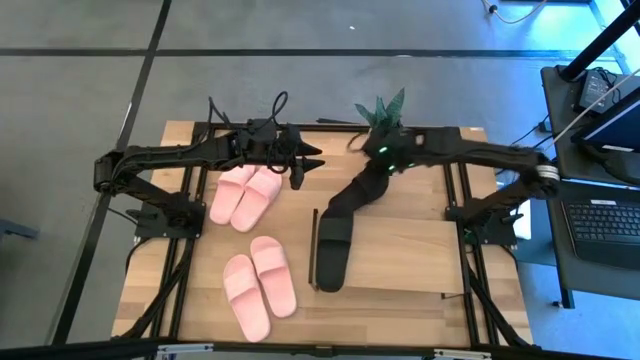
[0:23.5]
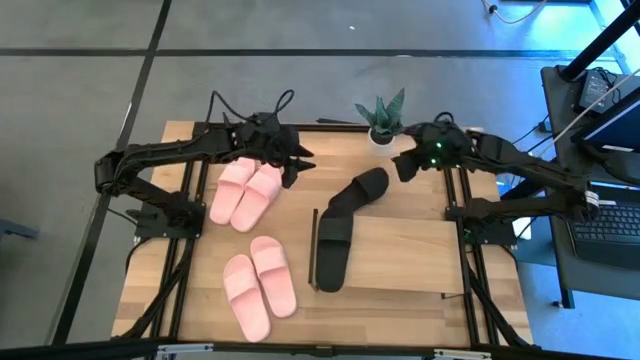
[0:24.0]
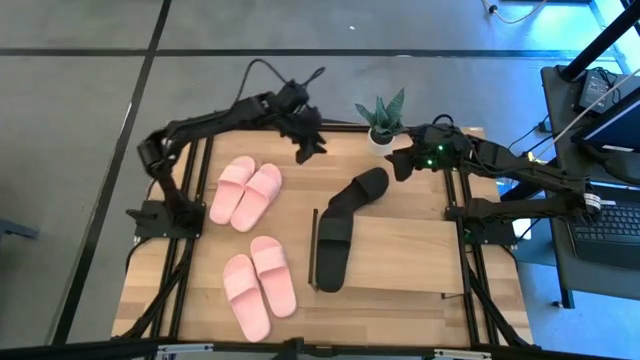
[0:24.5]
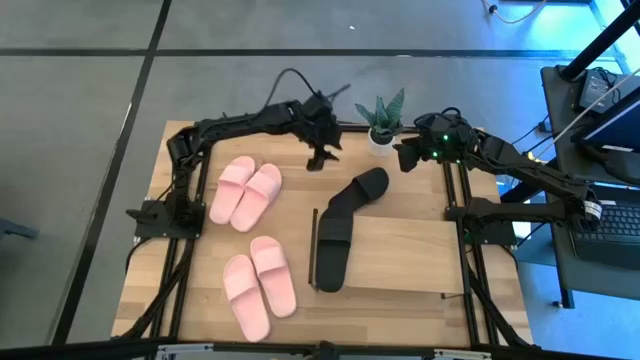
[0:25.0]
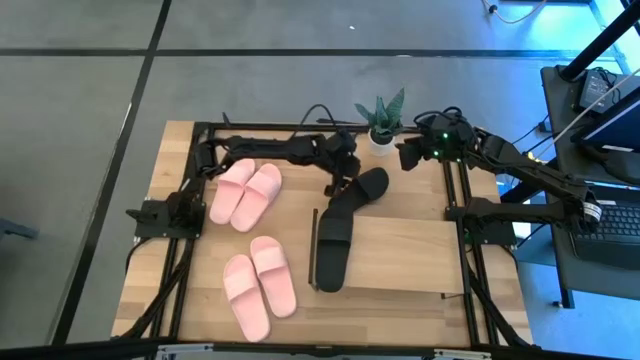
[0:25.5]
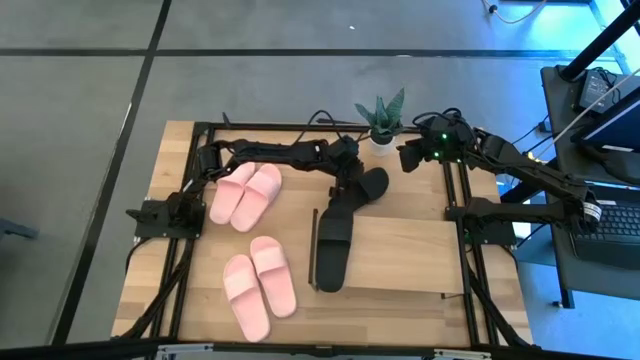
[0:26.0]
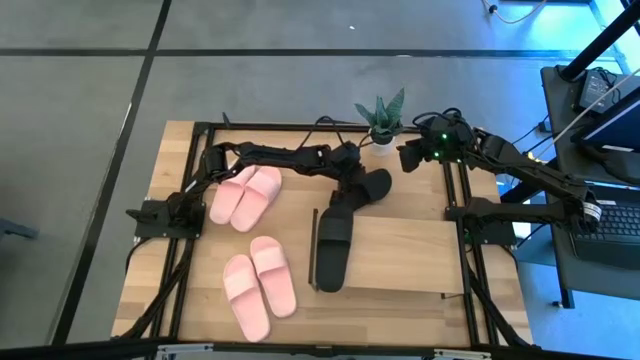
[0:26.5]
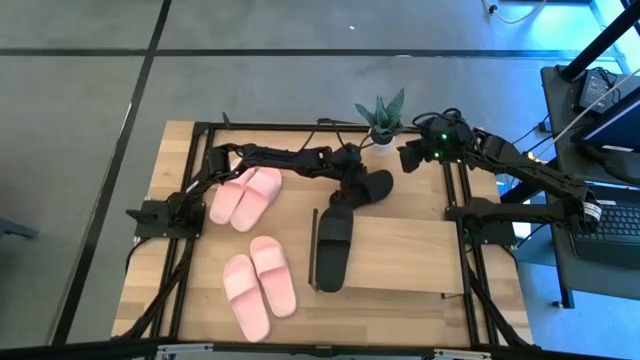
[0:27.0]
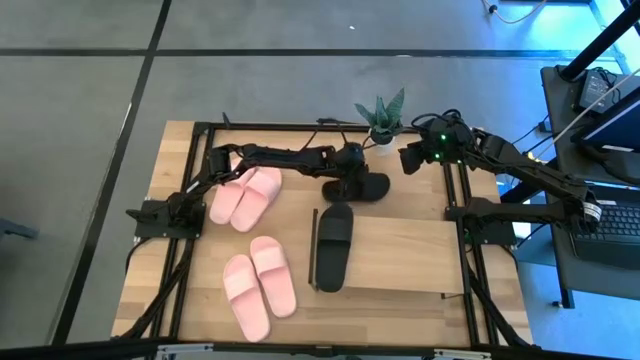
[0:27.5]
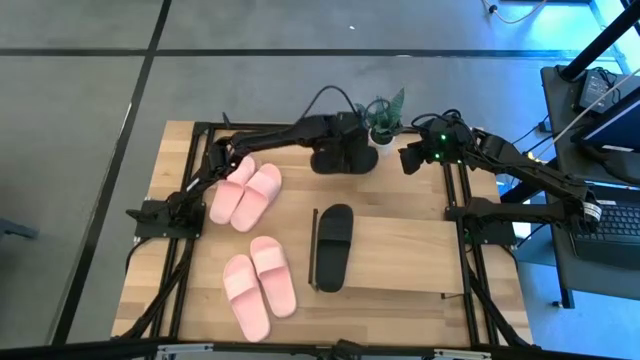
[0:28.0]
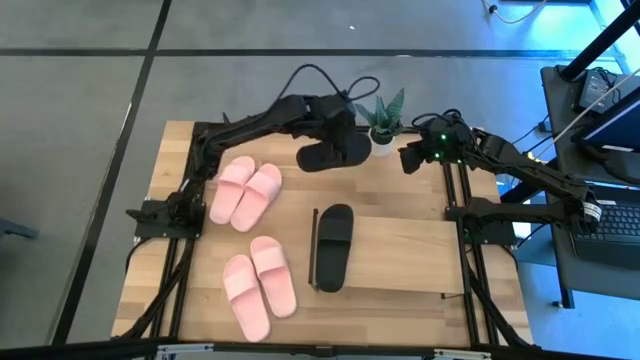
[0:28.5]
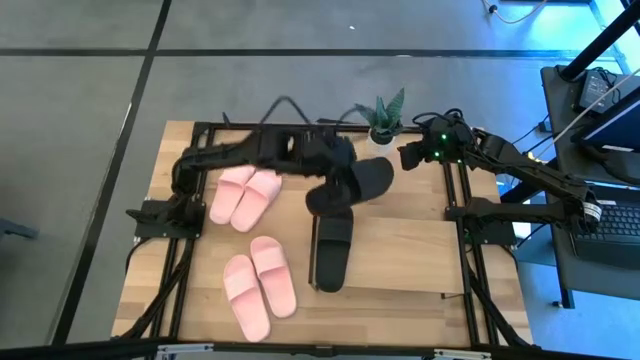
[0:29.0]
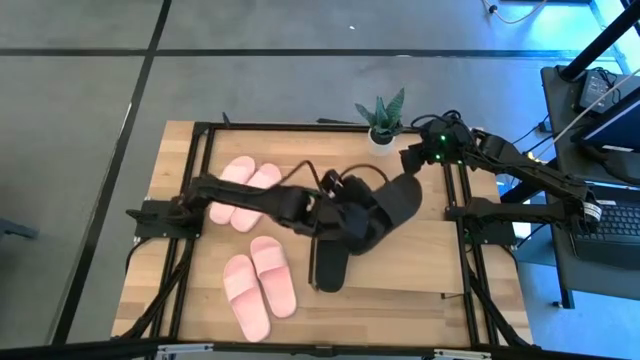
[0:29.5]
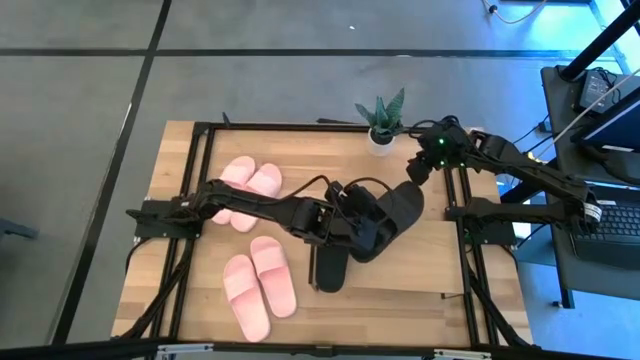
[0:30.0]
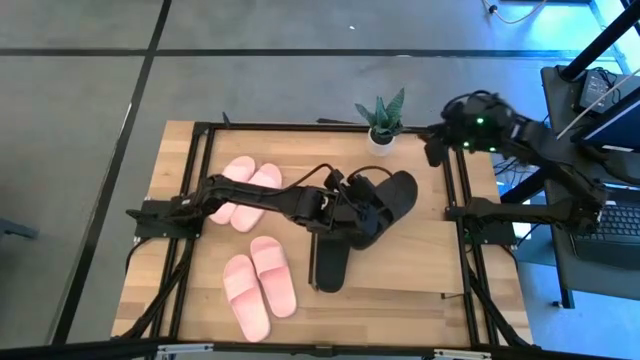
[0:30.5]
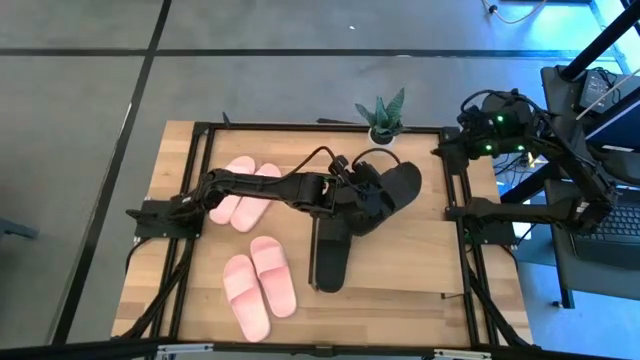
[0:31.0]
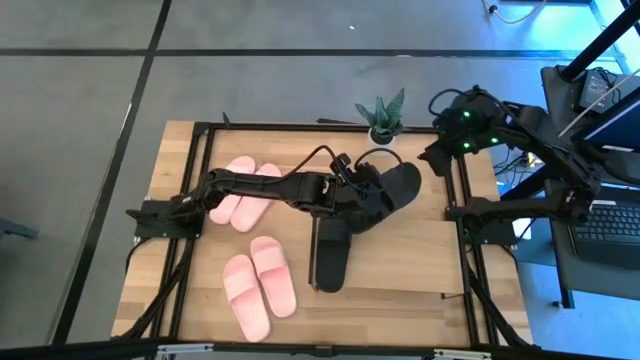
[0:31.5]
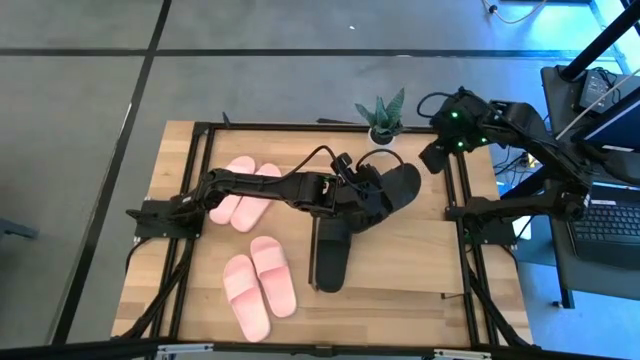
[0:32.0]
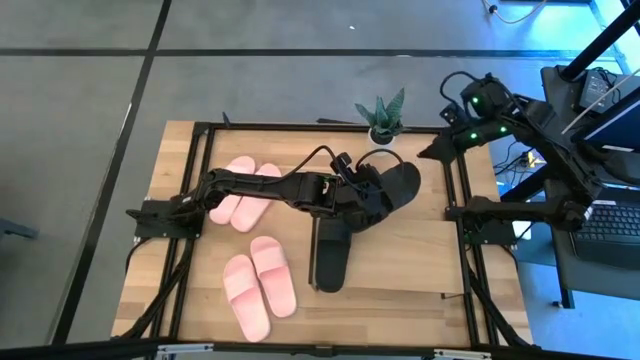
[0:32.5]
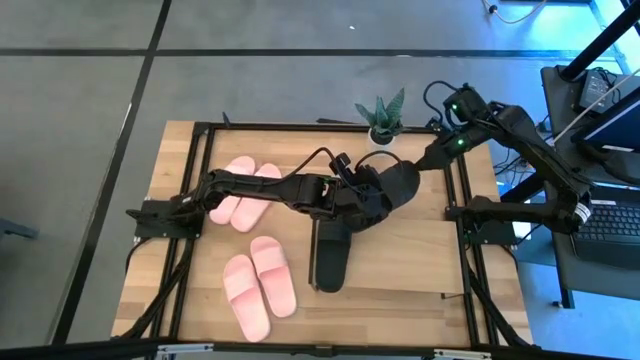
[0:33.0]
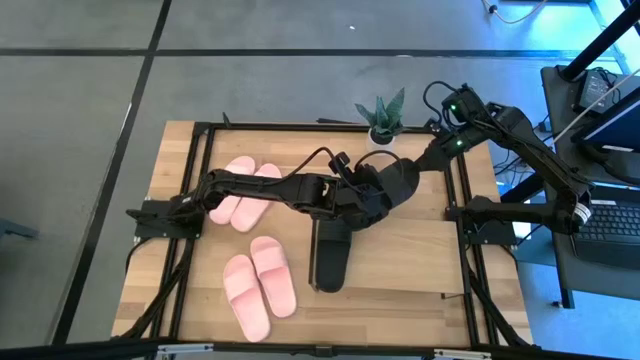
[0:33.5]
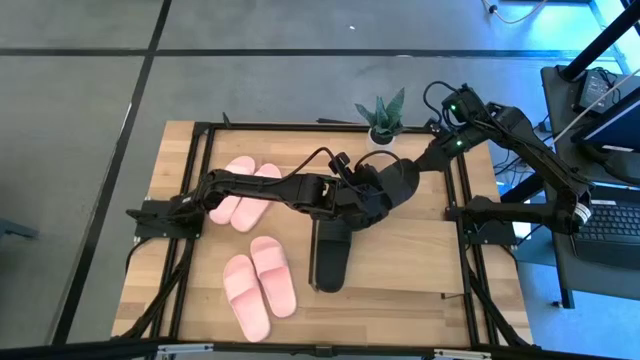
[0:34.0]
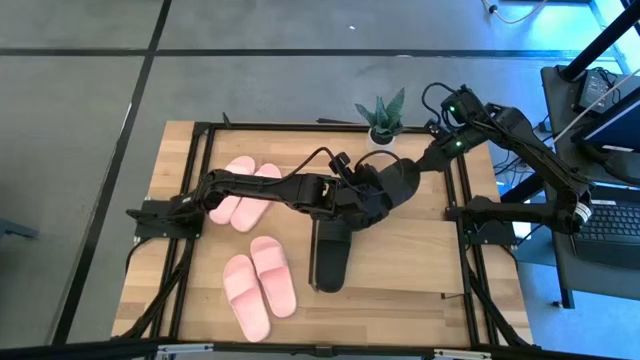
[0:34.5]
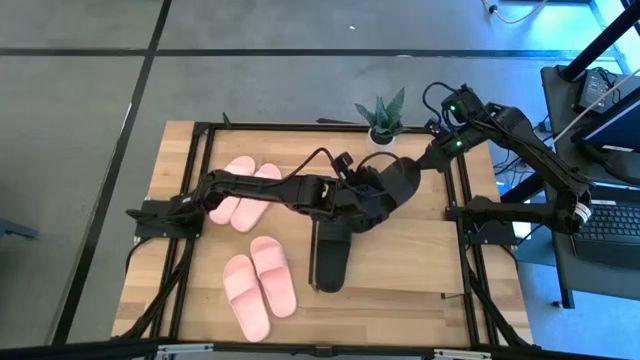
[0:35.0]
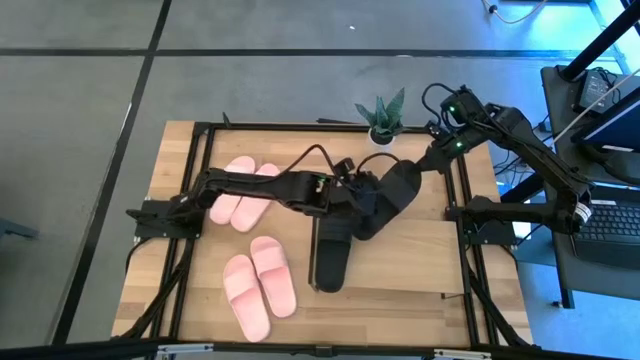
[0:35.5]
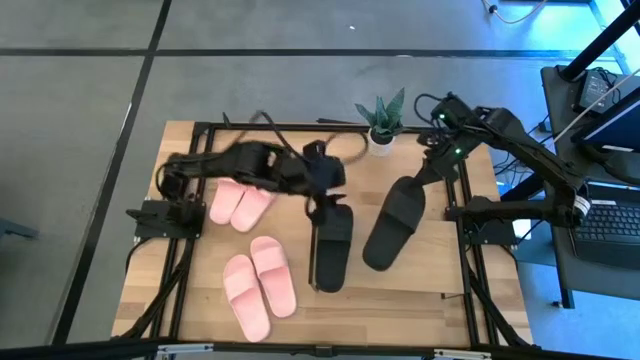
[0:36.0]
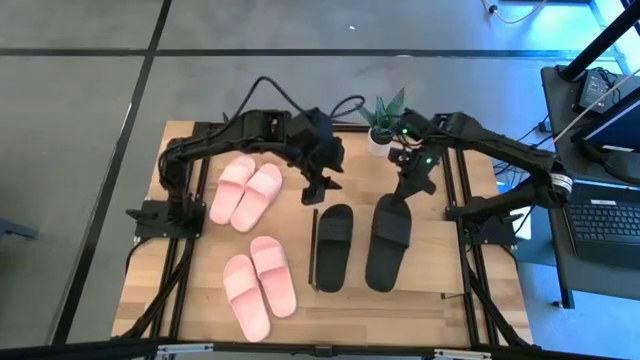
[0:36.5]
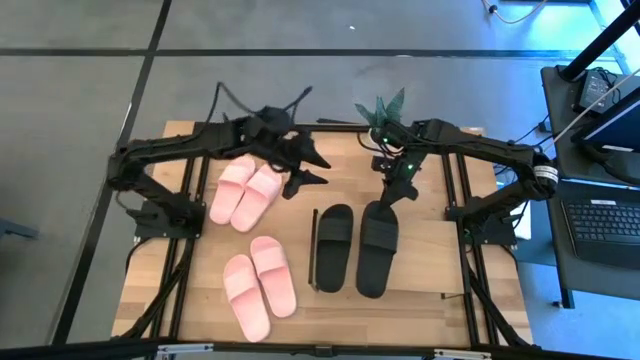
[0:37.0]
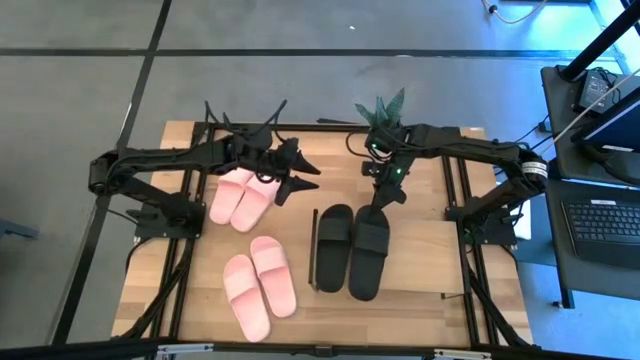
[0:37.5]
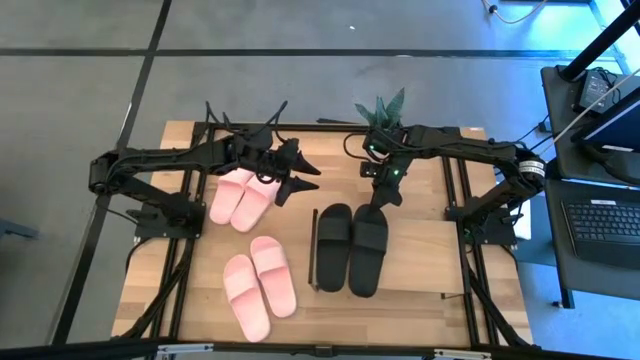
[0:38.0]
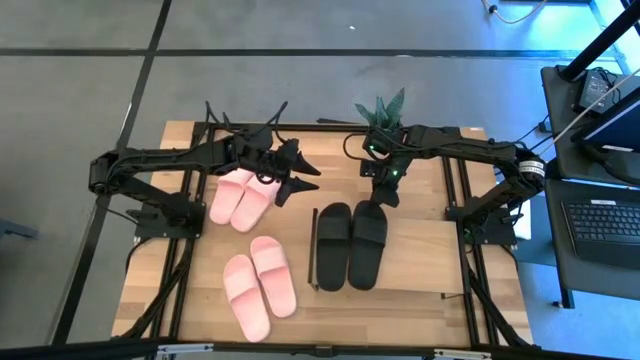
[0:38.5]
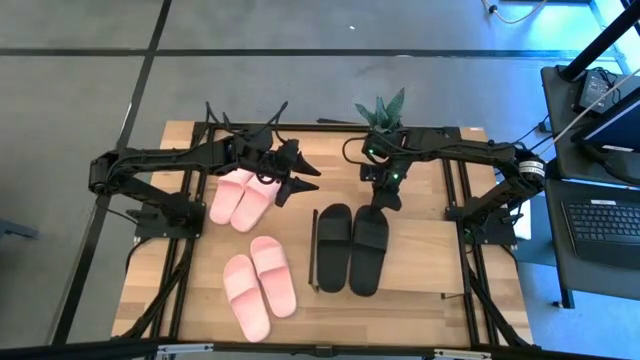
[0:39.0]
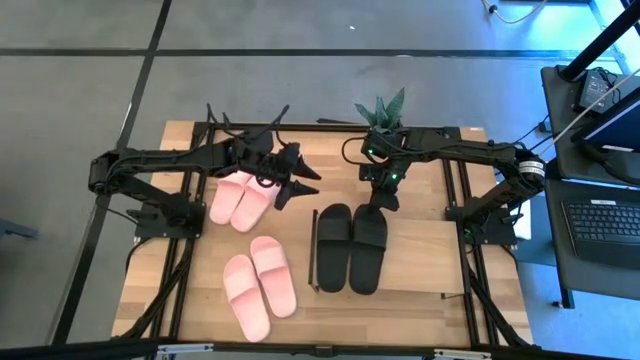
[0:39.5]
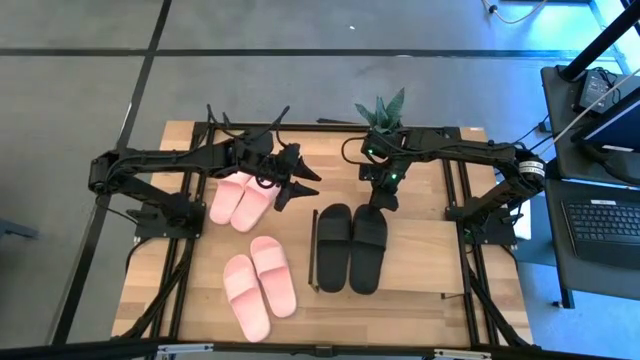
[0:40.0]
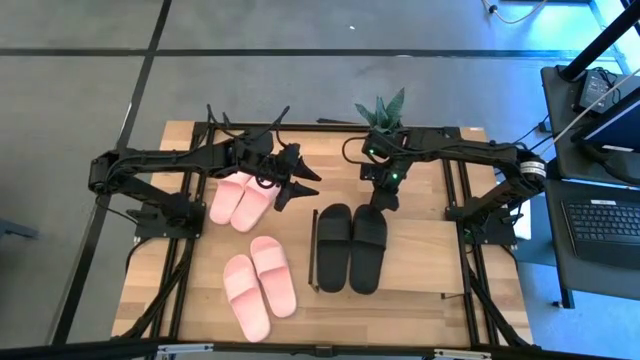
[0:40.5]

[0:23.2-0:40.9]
Task: Pick and place slides into the shelf
Put the black slipper onto the shelf

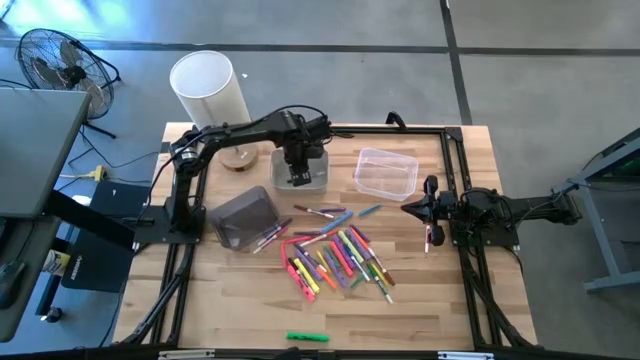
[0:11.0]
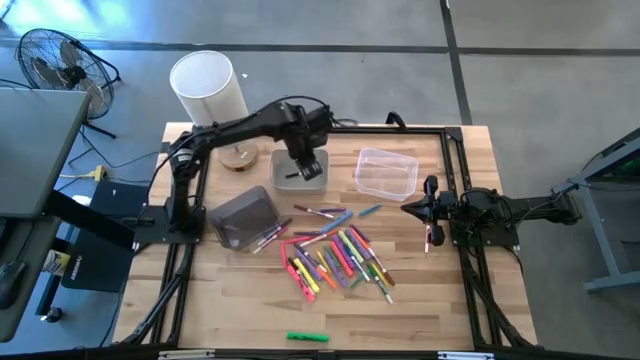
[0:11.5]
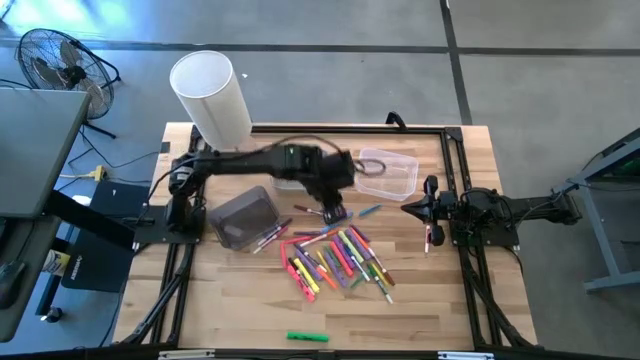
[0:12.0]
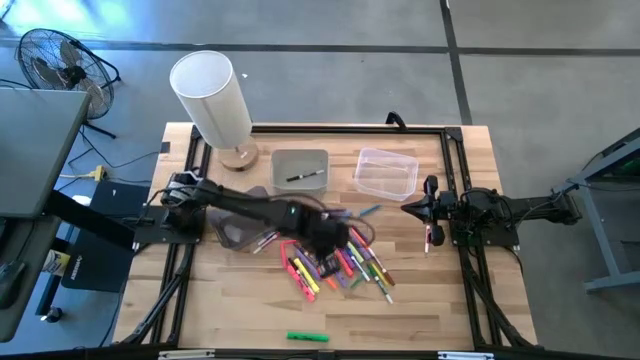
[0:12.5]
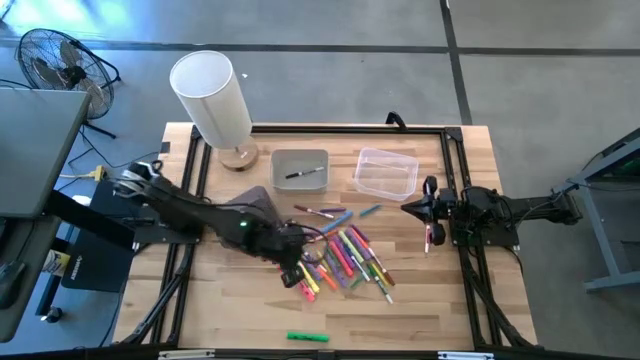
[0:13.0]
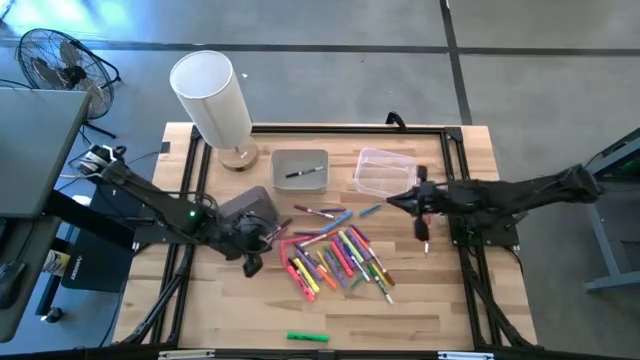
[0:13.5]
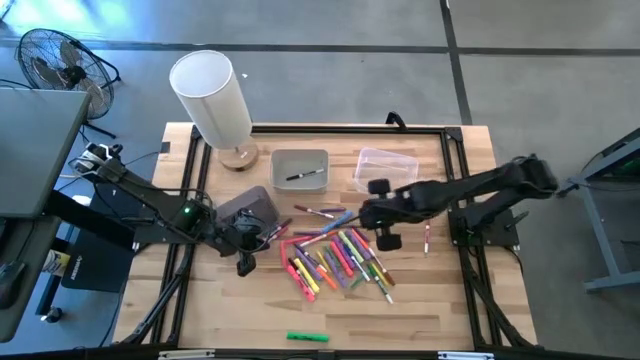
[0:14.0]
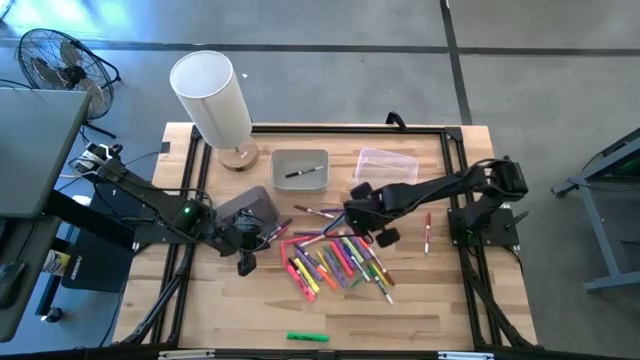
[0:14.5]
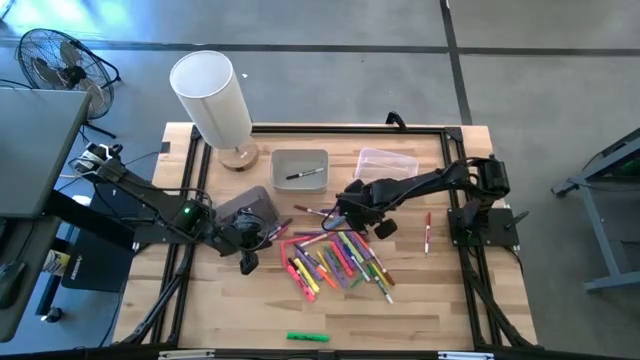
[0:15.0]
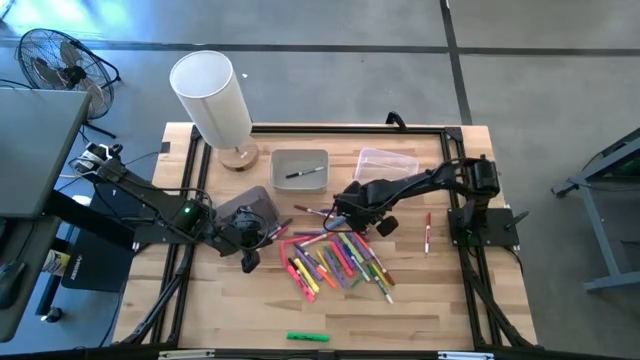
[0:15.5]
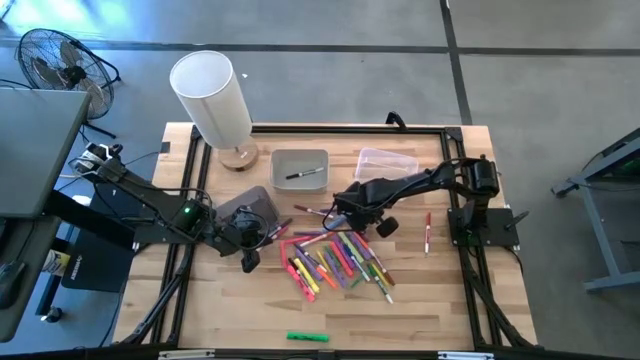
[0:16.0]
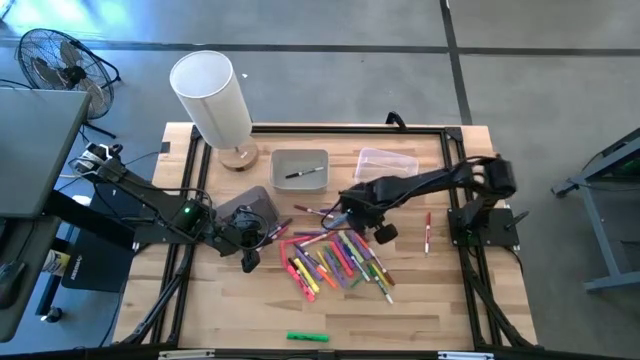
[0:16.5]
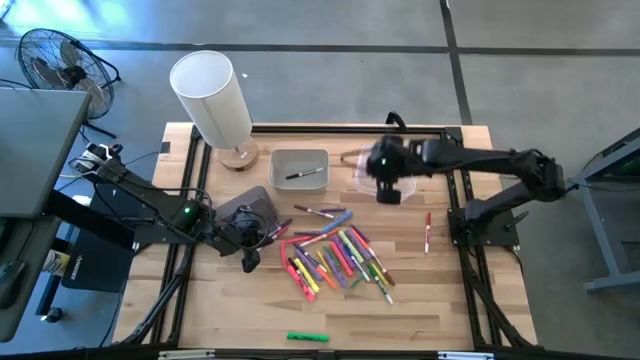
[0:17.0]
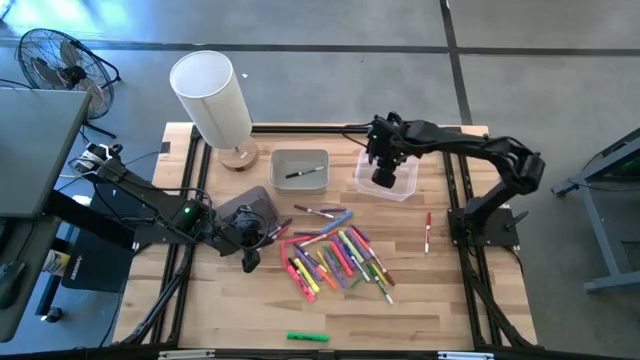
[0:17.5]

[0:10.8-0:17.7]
Task: Pick & Place Markers
Put the blue pen into the transparent bin
